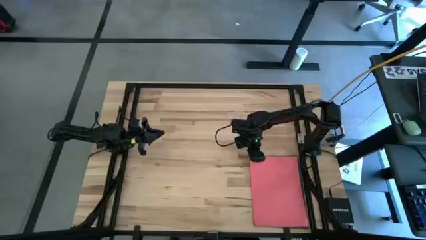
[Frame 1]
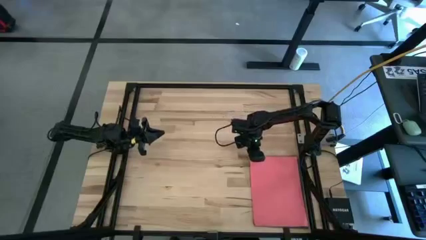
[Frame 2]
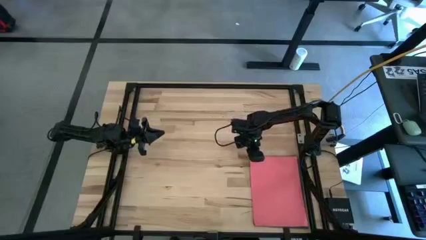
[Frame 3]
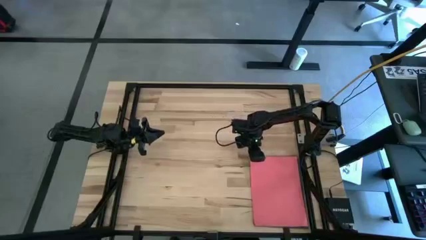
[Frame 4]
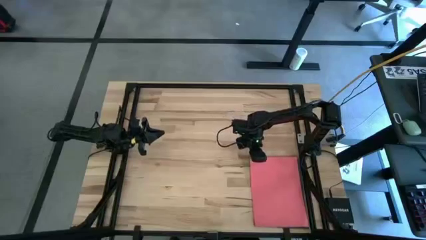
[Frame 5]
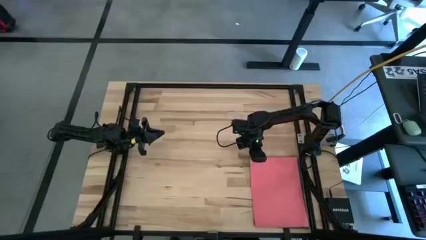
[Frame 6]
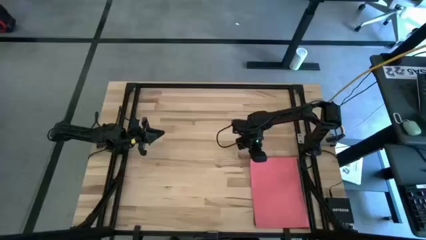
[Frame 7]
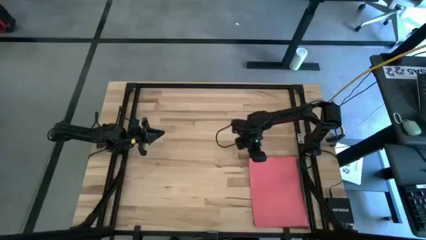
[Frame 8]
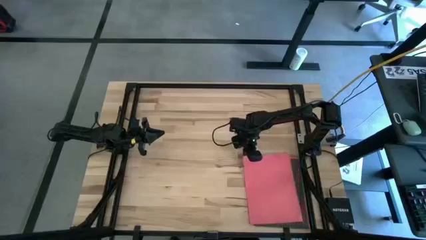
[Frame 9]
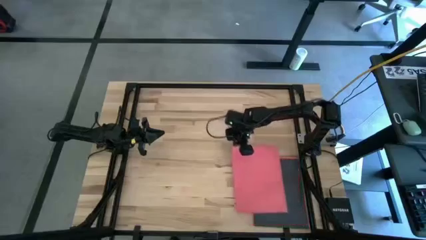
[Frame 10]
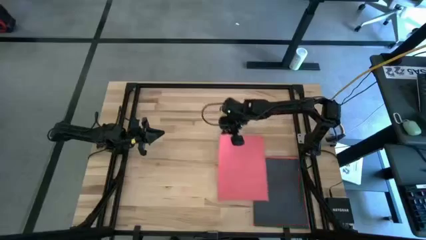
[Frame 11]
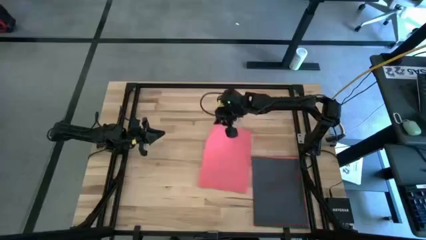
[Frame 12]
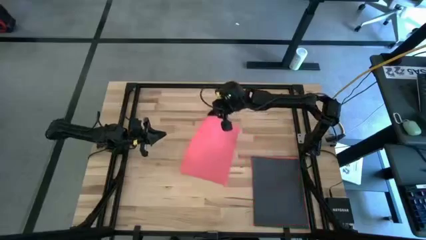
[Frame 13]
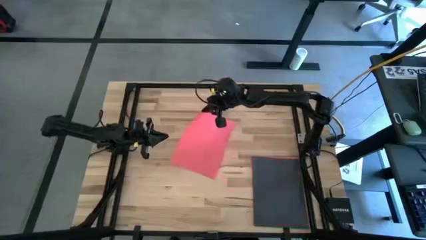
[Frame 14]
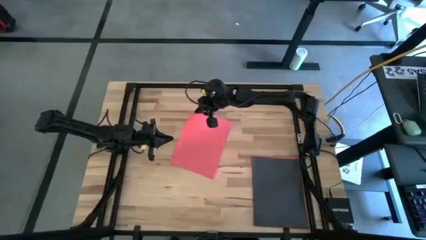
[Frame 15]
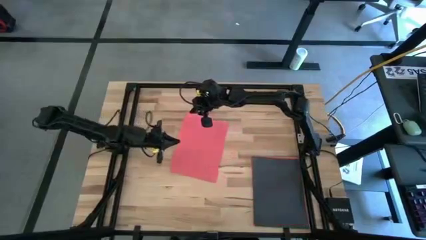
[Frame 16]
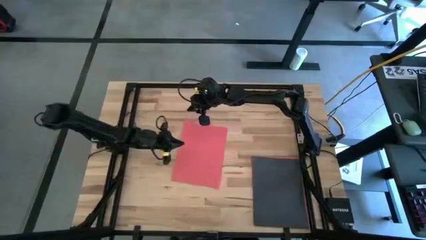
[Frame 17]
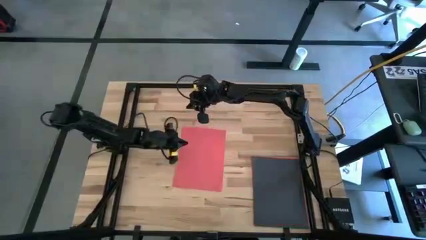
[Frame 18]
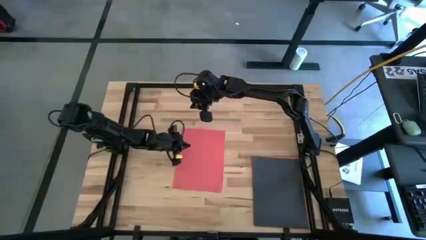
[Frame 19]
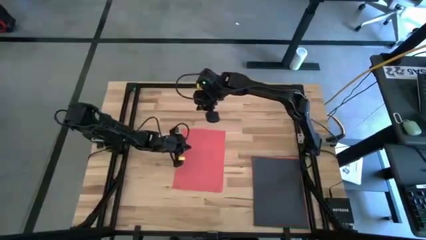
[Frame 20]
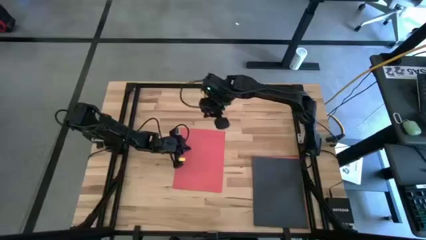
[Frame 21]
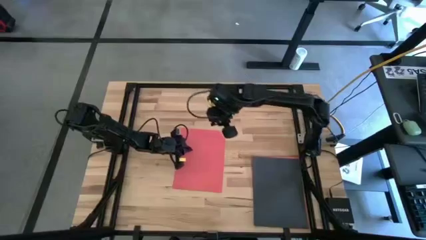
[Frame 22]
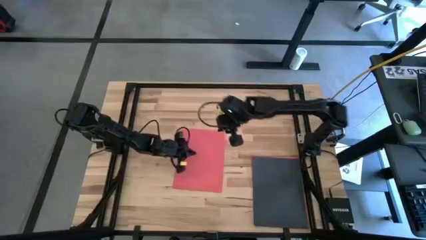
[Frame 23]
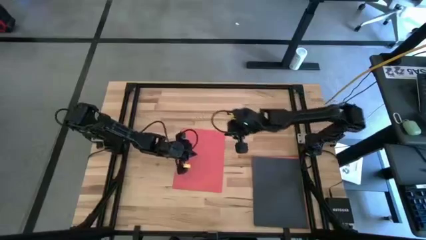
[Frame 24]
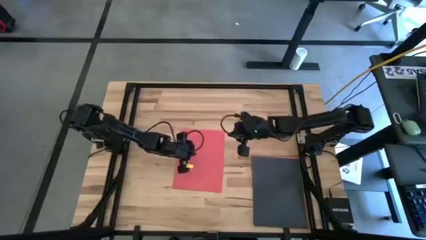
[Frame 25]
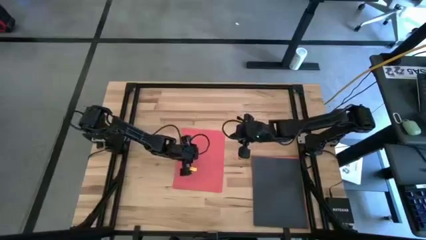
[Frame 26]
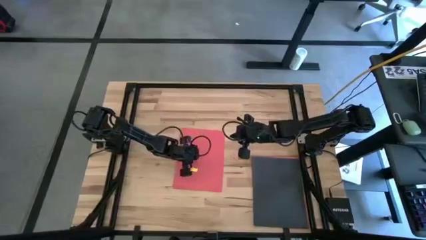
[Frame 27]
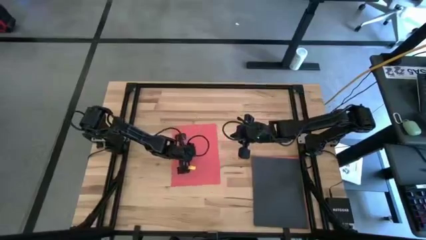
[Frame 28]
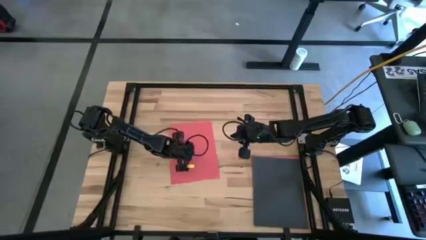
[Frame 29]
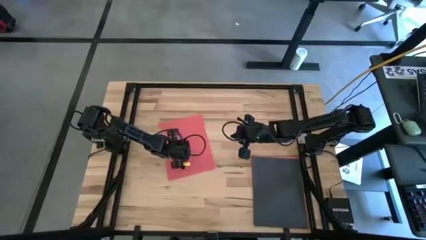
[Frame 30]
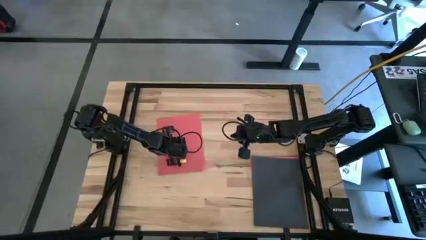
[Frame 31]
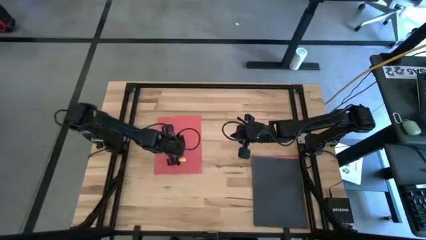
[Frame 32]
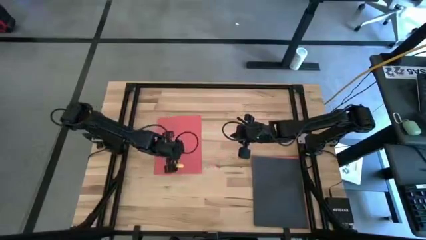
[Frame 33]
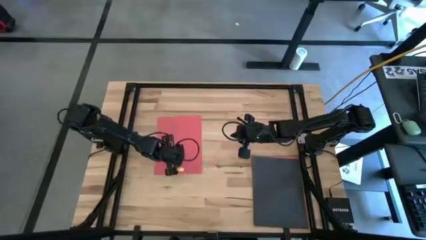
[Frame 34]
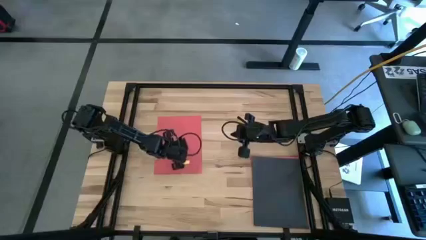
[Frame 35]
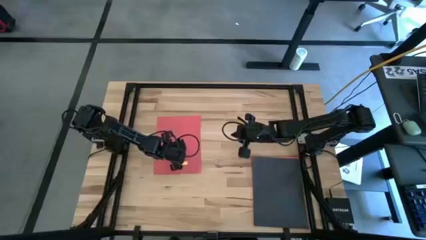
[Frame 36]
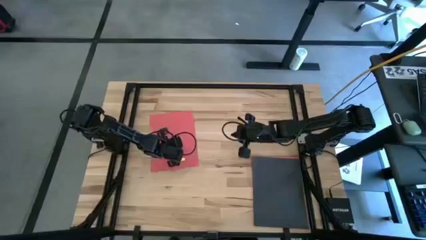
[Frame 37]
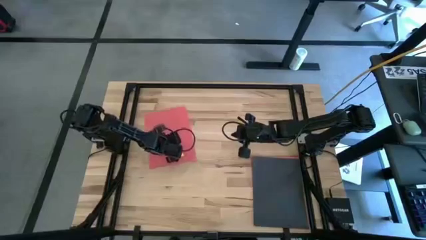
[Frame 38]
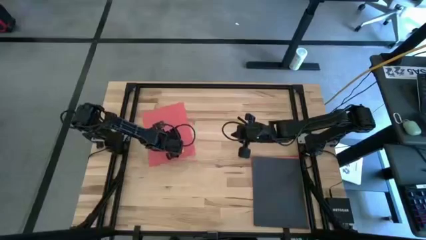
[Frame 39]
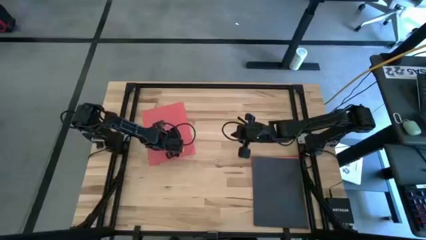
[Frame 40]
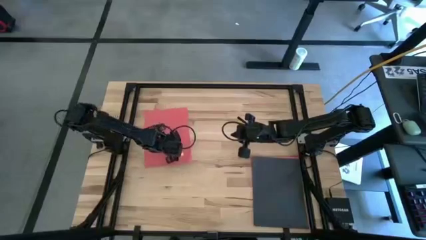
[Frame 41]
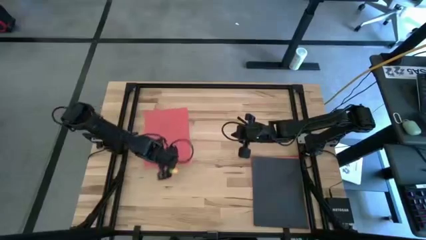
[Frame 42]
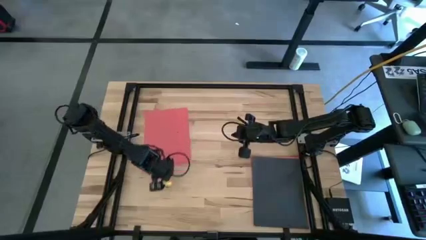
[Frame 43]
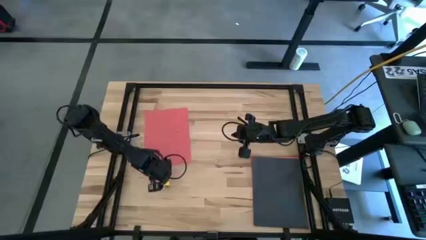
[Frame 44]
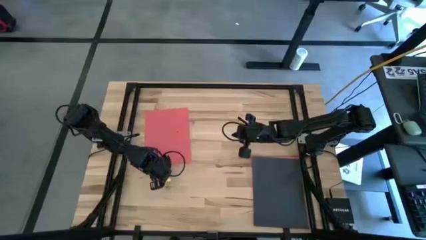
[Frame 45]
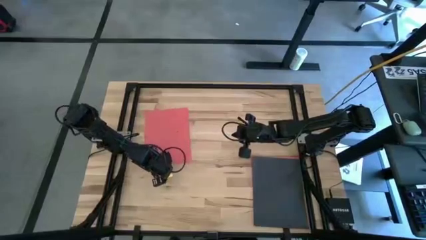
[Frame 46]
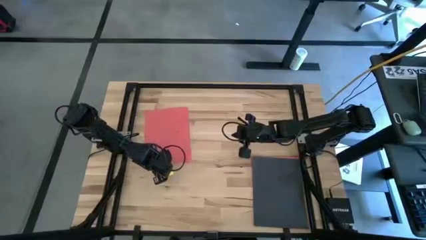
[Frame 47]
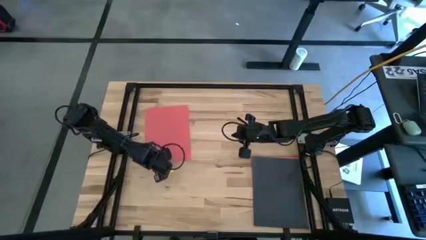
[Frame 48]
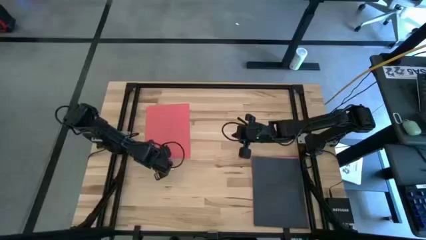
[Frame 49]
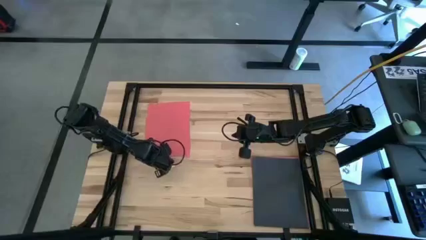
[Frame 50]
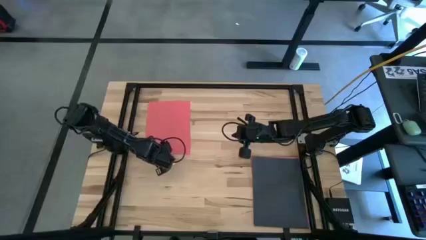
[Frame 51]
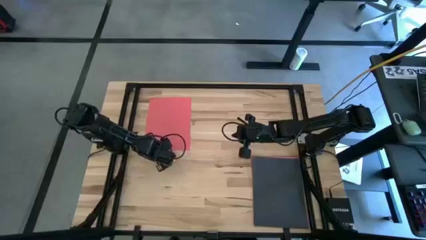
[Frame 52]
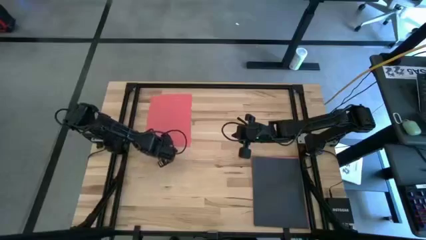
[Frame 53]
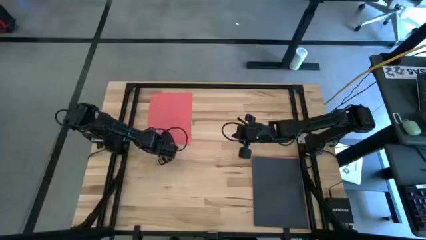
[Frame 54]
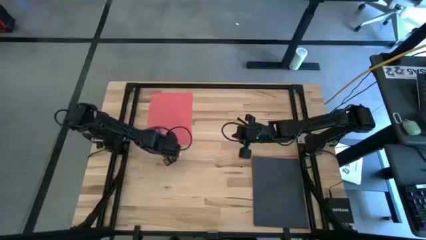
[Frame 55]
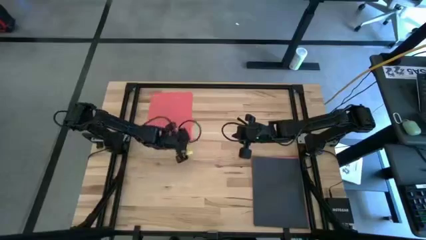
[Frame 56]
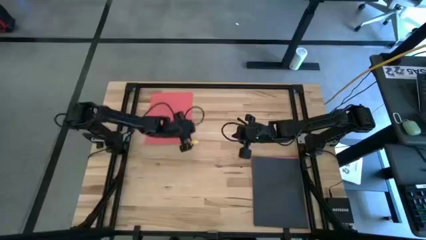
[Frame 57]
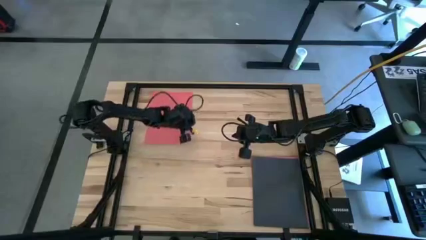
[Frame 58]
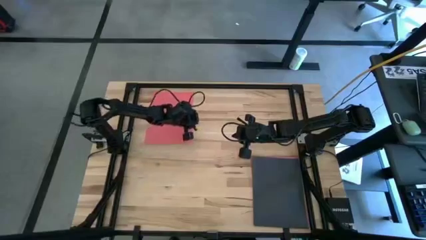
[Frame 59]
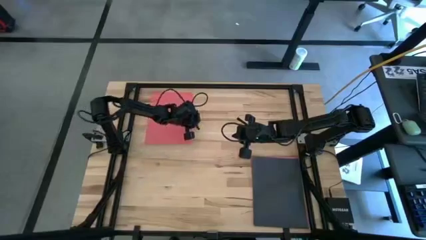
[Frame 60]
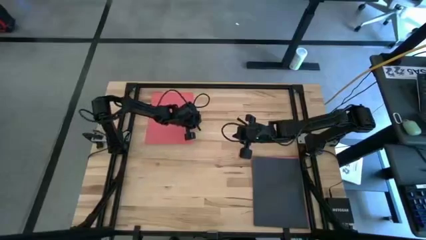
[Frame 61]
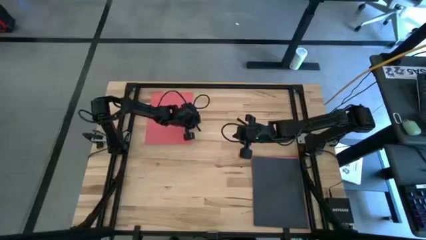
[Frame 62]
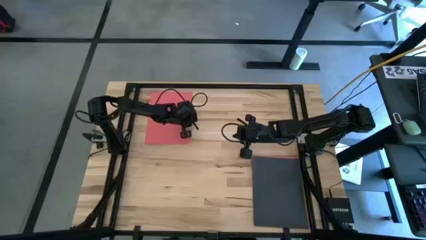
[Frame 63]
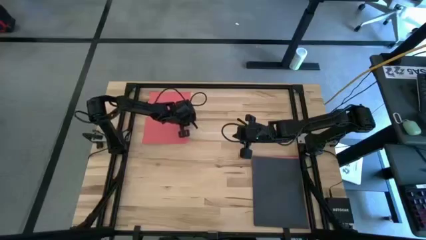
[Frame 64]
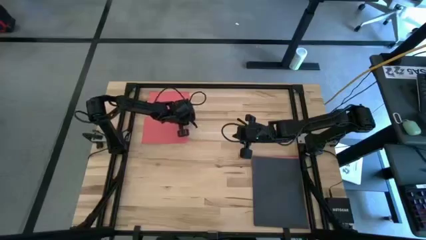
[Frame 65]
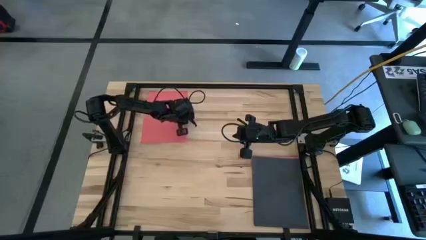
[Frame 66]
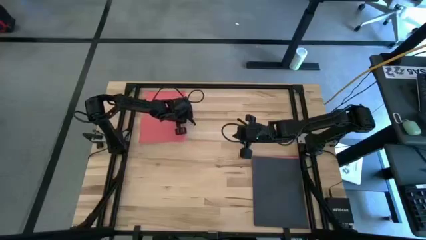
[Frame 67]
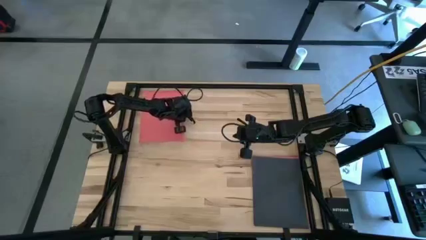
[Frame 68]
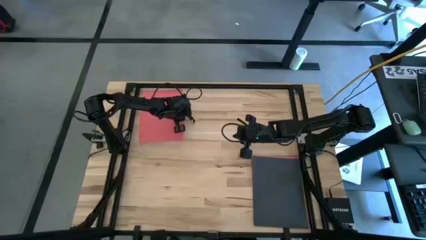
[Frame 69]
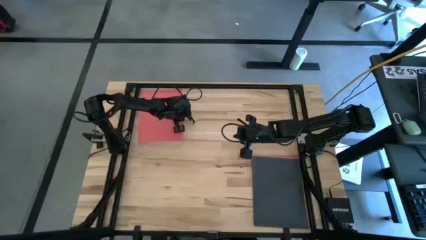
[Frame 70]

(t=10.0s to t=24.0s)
Task: Organize paper
Move the red paper to the top left of the table
